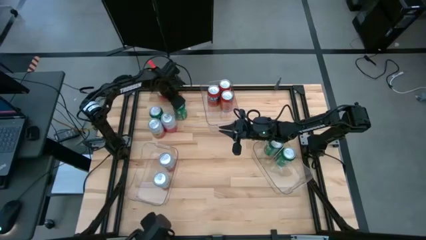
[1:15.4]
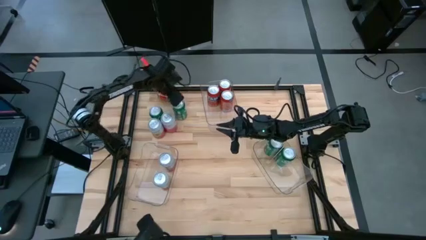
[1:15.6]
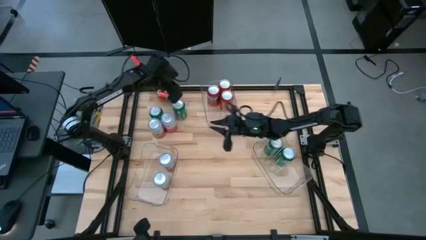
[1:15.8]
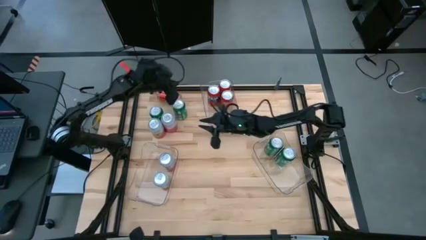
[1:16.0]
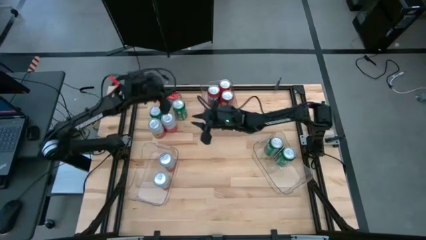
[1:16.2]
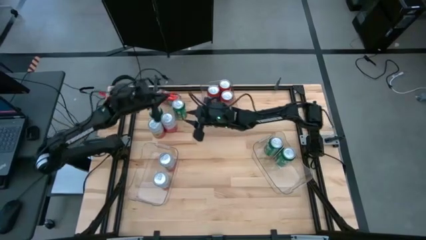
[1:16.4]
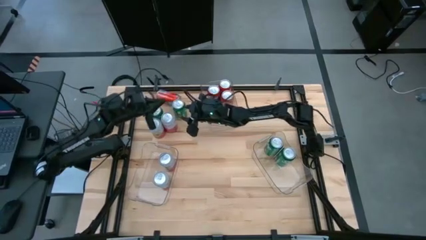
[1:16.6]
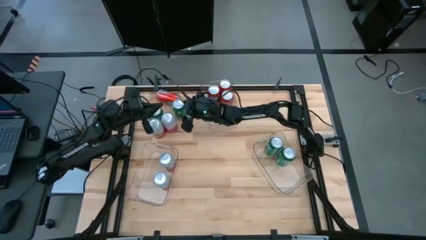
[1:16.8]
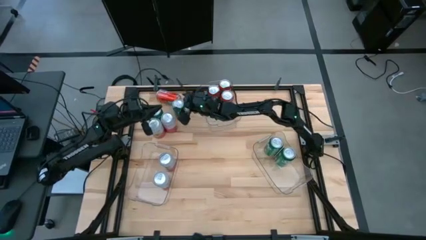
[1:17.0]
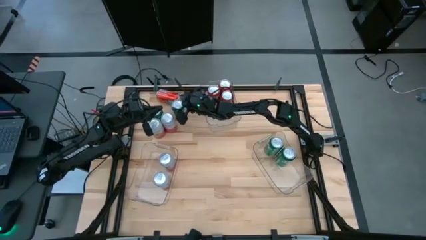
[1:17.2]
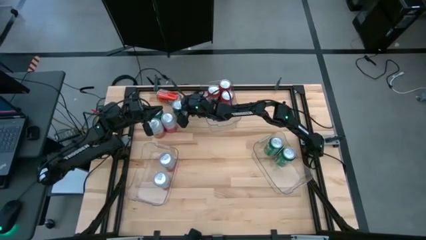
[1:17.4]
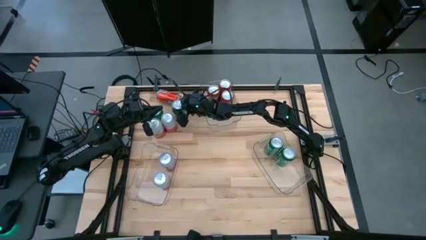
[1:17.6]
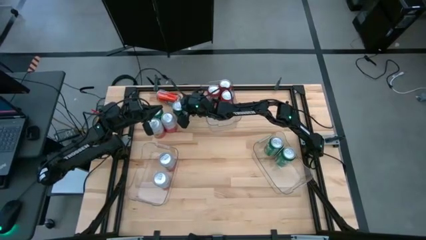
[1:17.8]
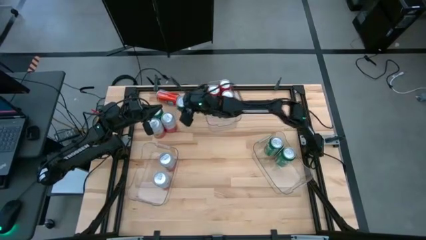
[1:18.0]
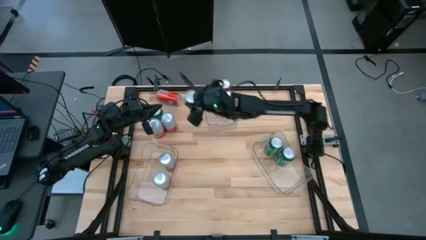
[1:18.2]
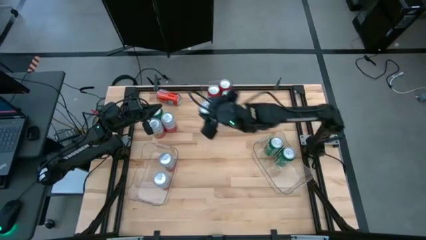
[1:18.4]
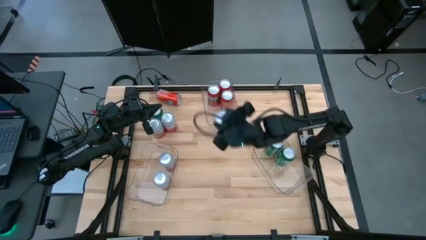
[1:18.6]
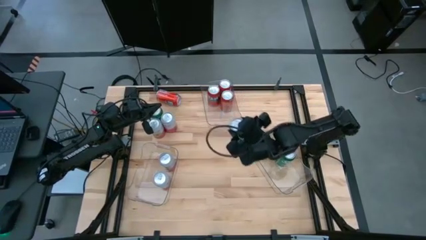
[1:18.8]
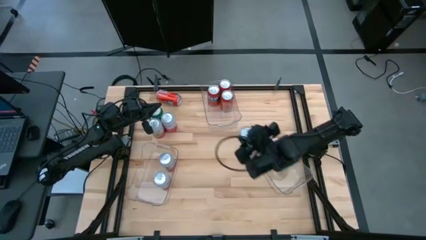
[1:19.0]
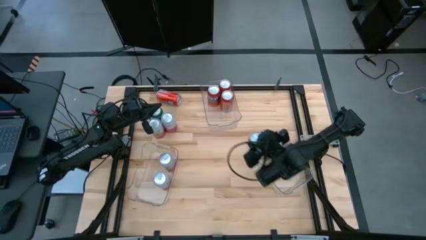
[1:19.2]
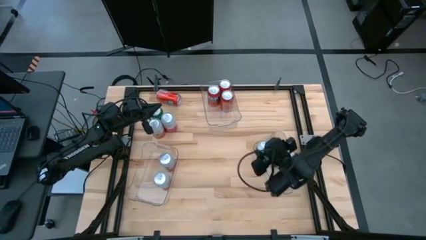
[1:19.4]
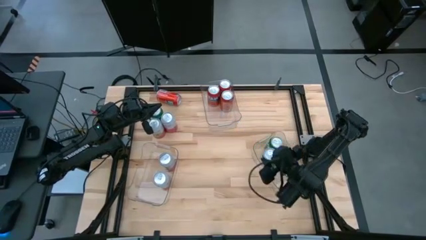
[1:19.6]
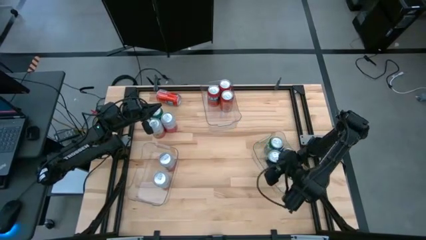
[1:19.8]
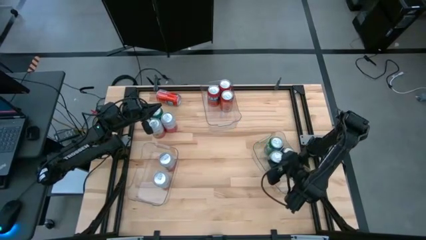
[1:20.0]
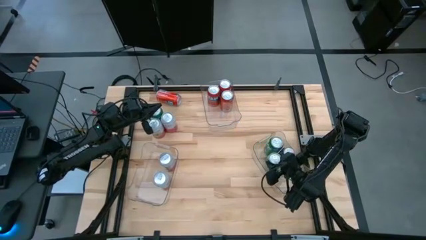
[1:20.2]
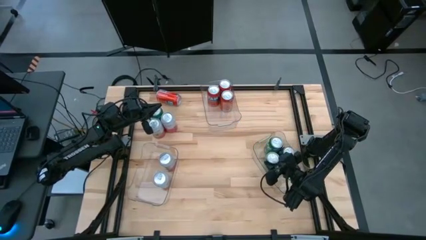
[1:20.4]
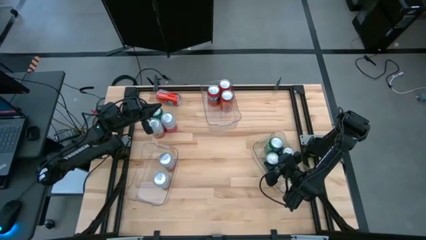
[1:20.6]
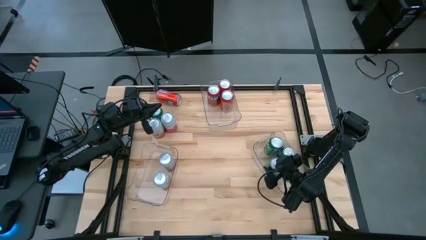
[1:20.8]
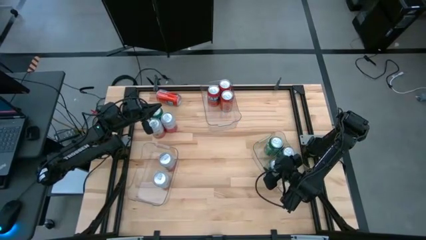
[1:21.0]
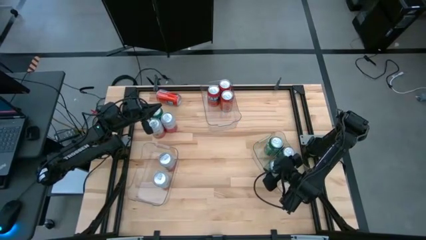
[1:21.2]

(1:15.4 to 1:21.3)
Task: Sort soda cans
Put the green soda can into the bottom right transparent bin

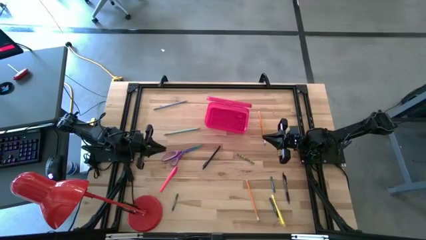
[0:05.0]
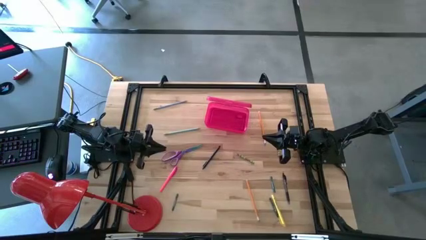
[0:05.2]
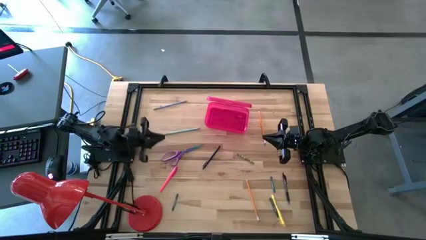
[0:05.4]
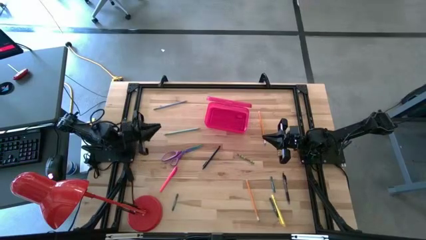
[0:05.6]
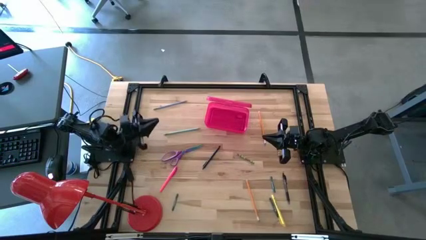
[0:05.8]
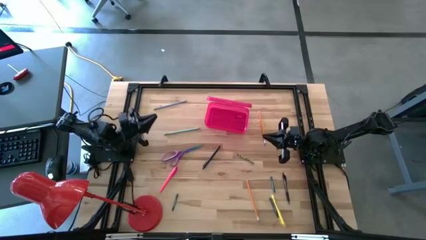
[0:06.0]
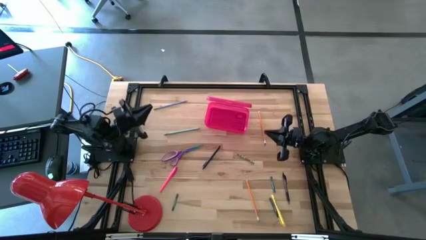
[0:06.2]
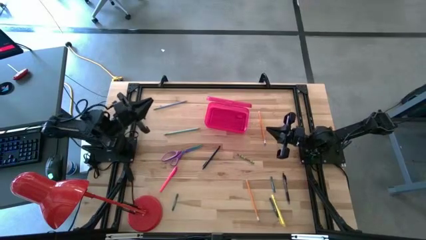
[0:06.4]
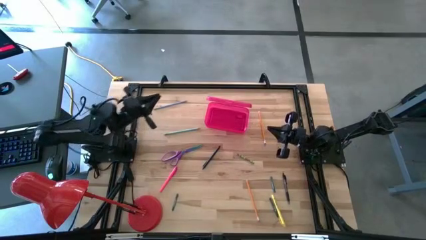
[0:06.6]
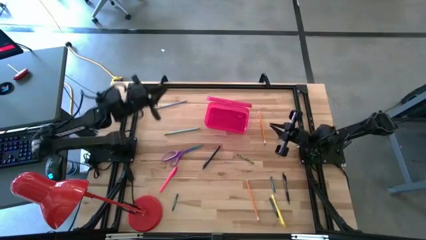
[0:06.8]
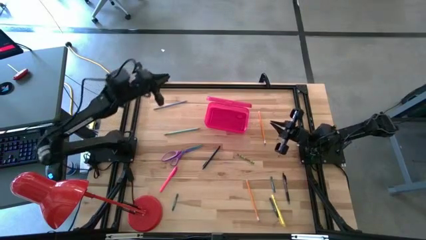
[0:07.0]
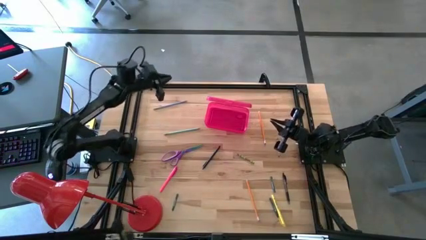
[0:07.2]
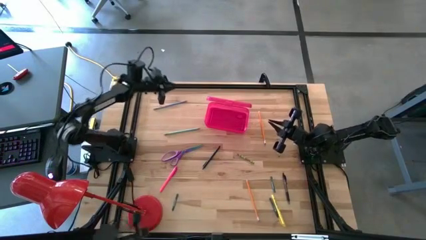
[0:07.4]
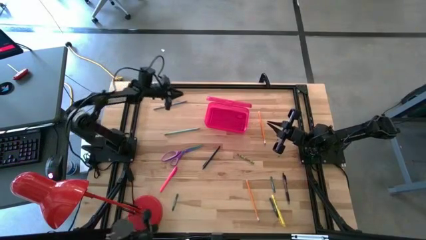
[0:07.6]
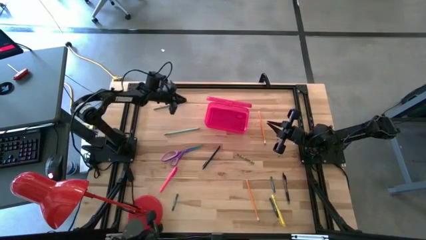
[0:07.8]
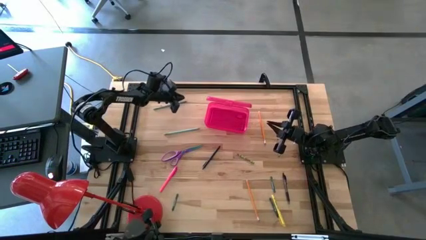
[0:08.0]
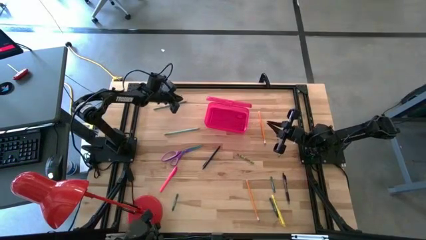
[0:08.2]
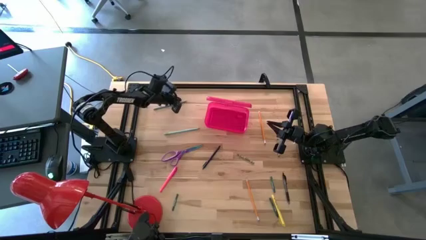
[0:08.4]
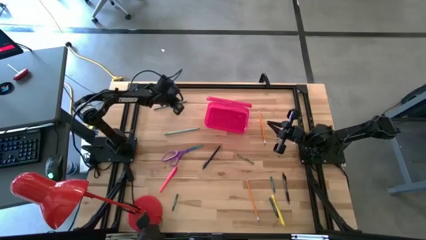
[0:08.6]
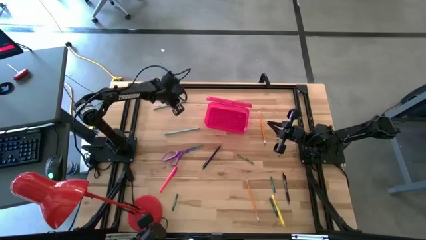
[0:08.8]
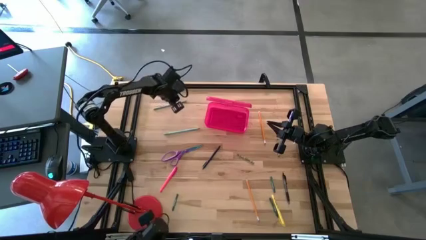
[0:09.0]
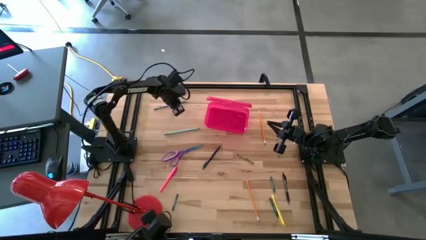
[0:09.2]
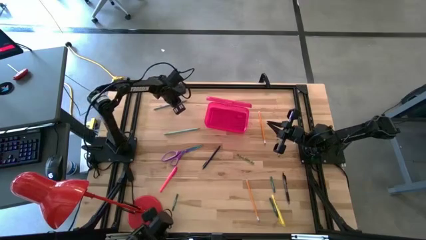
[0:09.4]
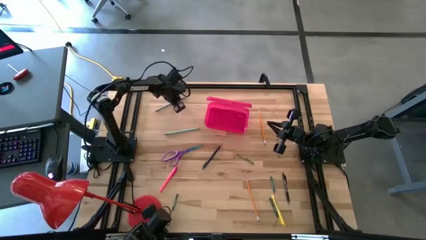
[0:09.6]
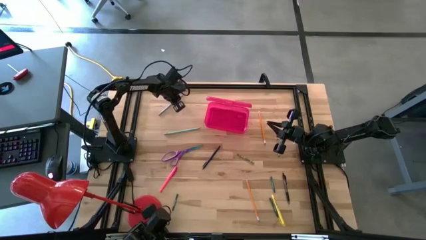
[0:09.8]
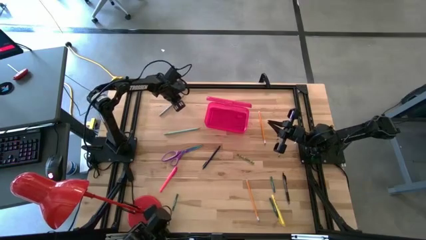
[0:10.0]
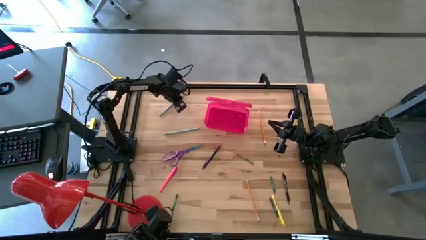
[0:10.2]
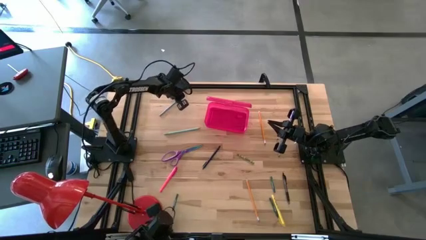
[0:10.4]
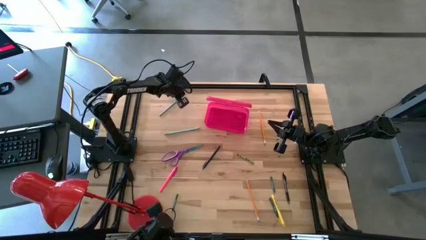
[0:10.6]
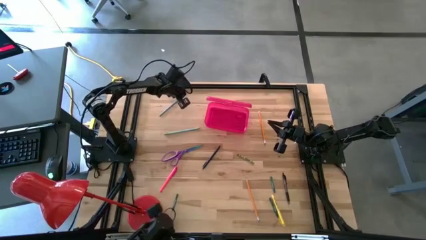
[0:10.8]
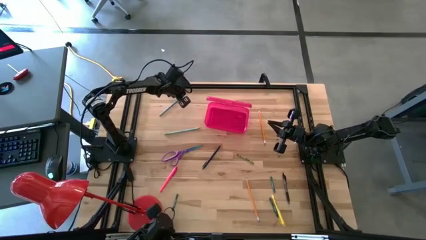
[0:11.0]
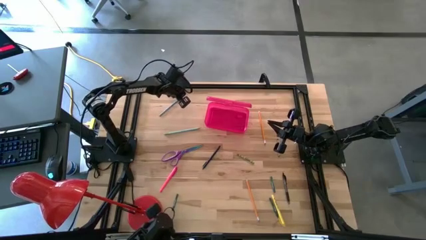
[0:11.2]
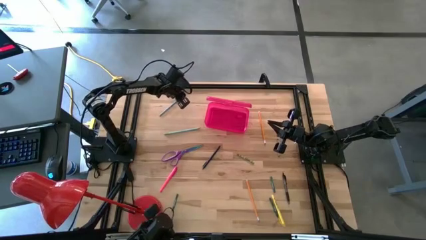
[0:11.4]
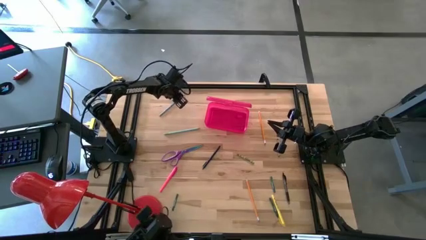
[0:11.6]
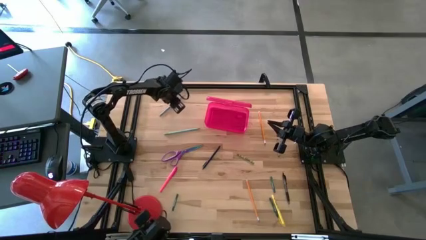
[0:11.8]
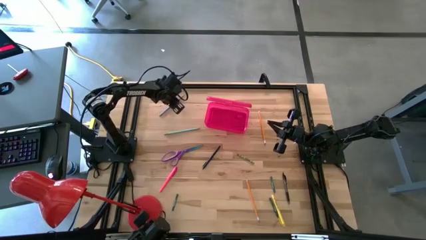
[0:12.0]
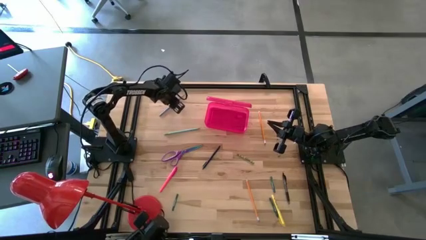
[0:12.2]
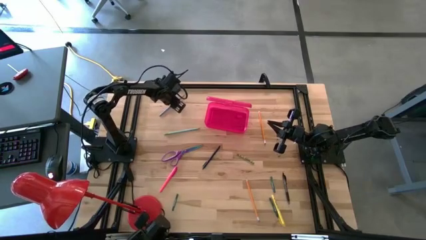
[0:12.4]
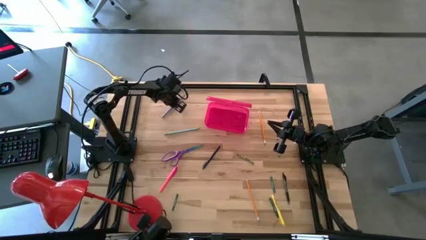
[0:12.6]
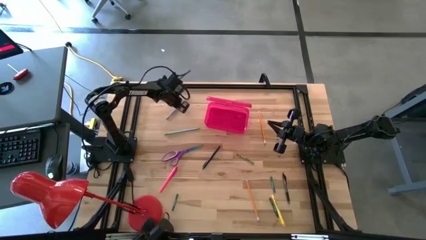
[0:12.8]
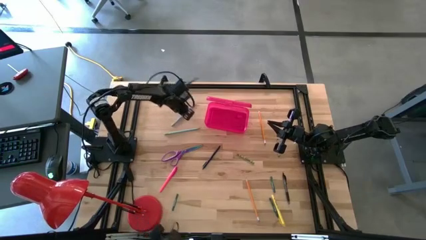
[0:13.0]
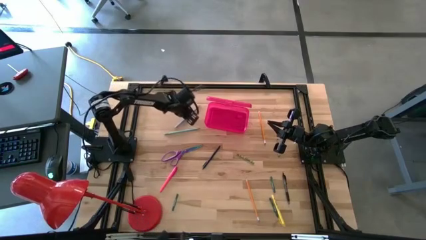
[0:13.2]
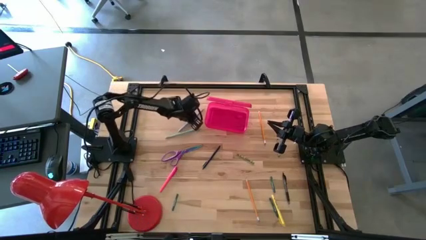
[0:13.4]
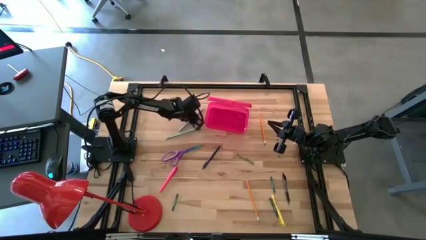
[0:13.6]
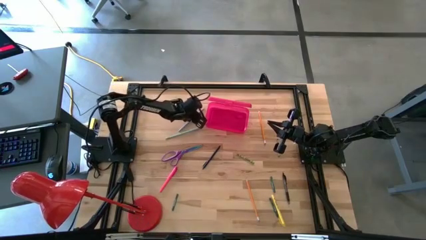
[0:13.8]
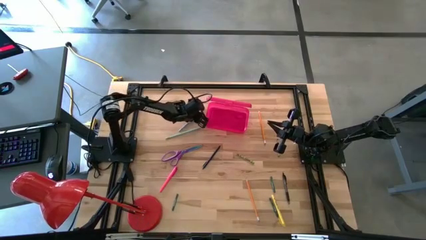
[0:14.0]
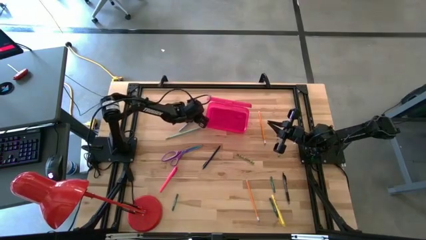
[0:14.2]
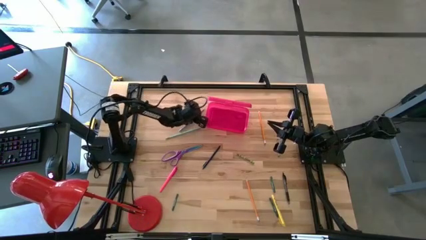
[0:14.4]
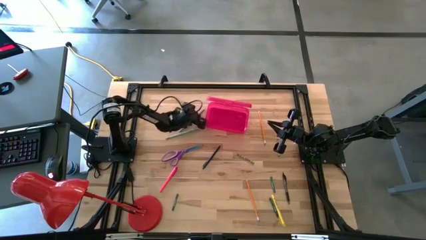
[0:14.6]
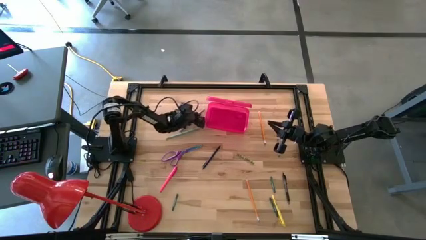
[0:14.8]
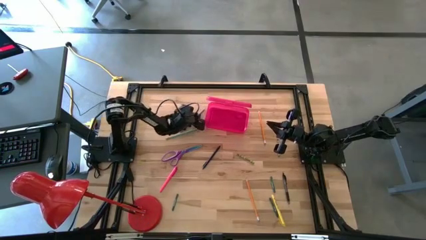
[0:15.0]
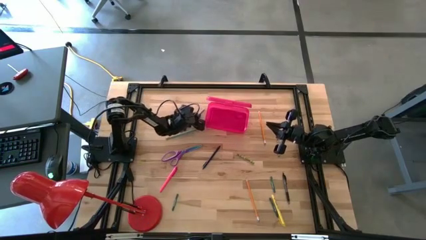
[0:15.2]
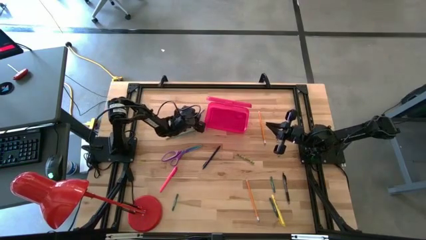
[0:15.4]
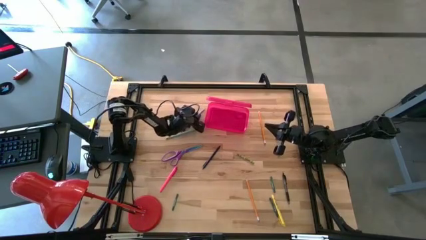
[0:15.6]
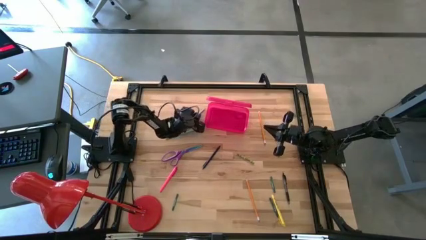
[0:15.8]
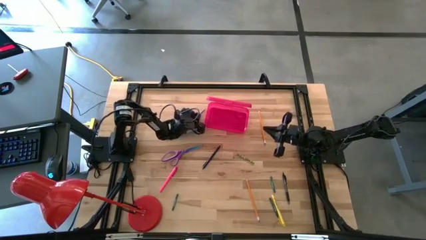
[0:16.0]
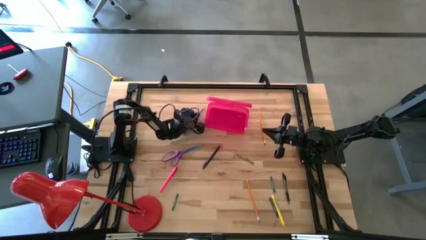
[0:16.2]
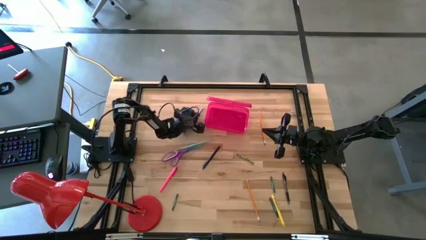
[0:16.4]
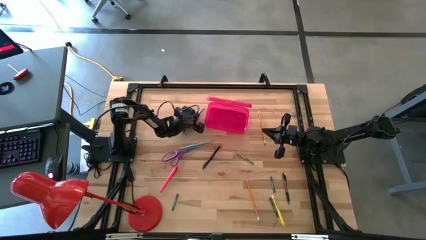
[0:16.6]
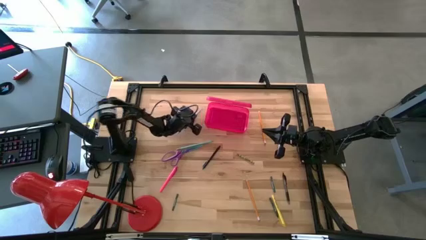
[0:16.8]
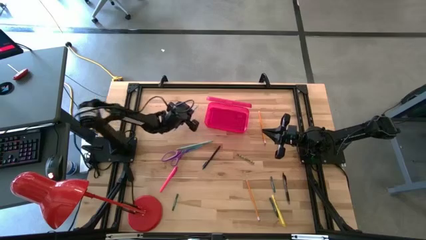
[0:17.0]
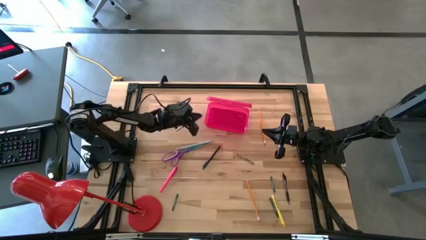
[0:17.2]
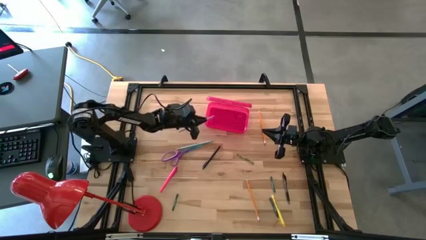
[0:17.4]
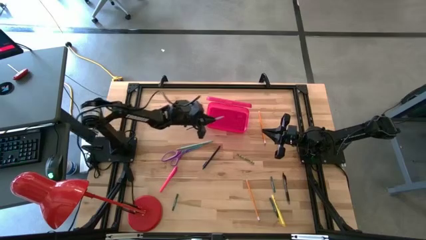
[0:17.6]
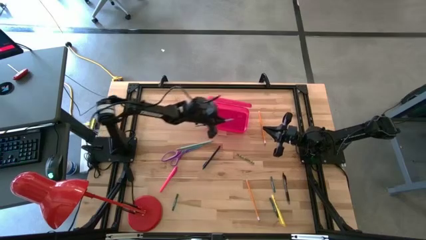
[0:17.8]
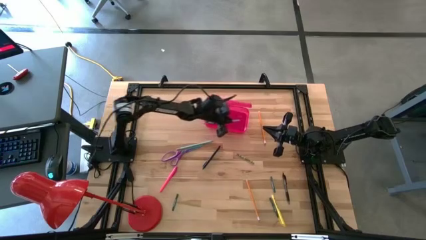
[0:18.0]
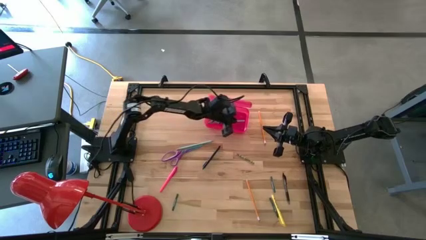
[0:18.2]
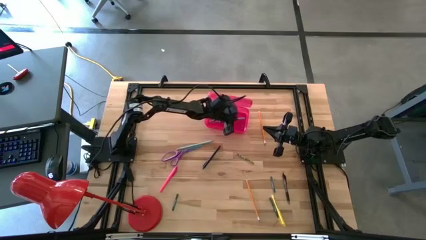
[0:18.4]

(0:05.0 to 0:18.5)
Task: Pick & place school supplies into a supply box
Put the blue pencil into the pink supply box
